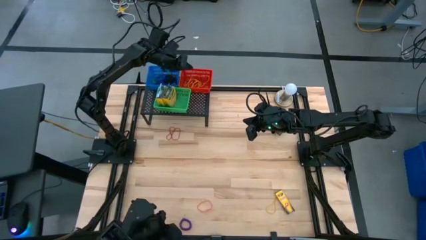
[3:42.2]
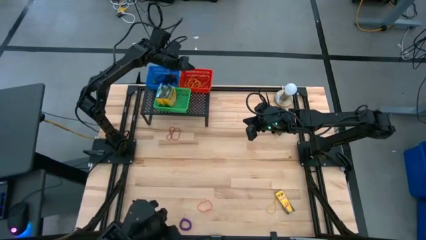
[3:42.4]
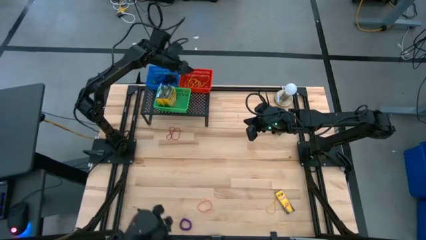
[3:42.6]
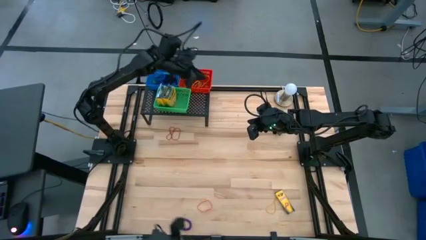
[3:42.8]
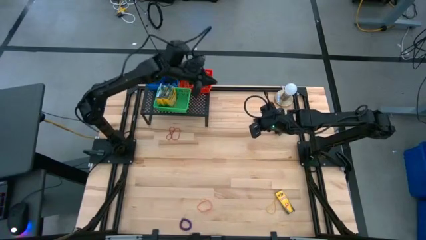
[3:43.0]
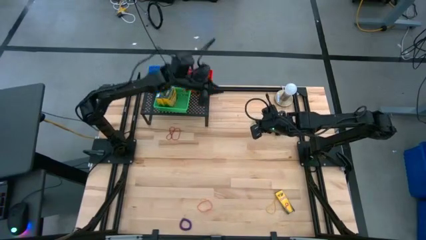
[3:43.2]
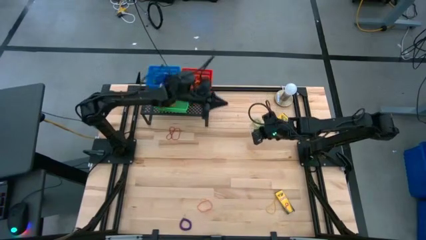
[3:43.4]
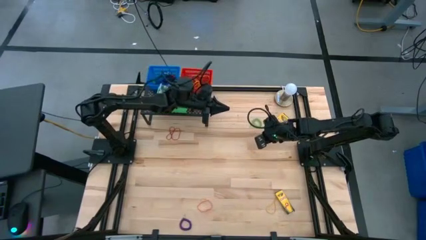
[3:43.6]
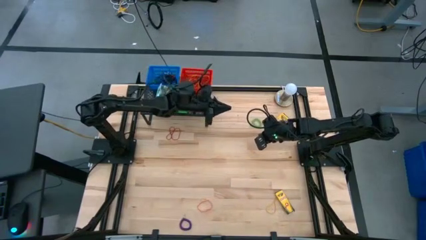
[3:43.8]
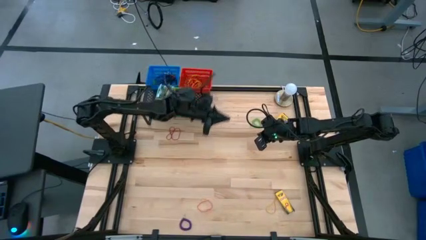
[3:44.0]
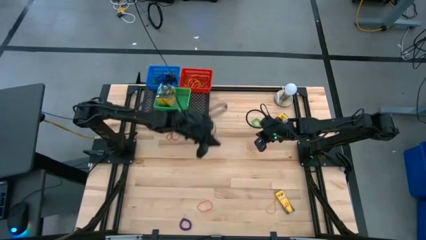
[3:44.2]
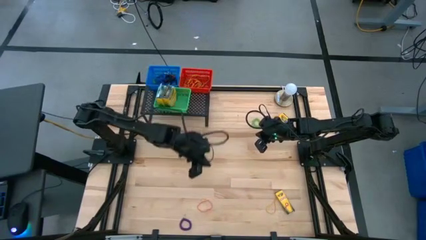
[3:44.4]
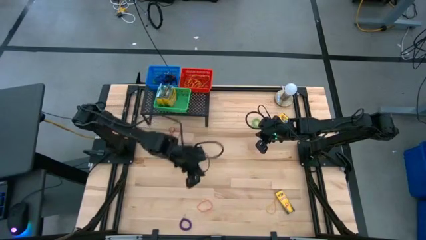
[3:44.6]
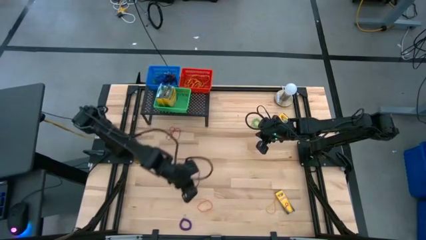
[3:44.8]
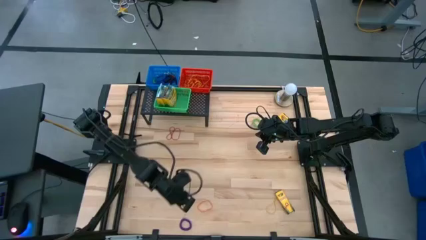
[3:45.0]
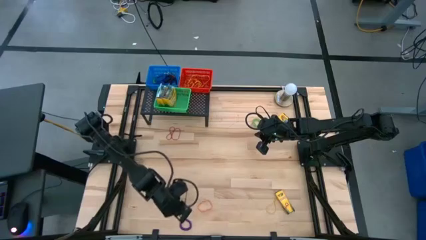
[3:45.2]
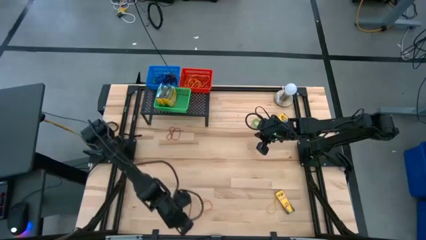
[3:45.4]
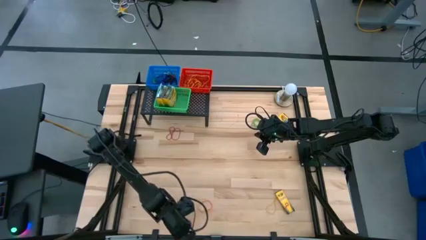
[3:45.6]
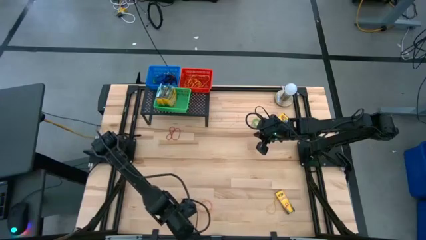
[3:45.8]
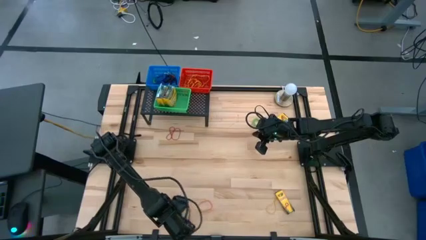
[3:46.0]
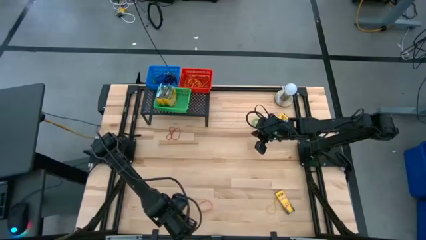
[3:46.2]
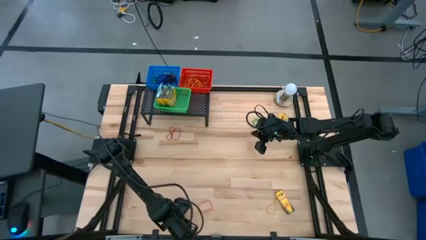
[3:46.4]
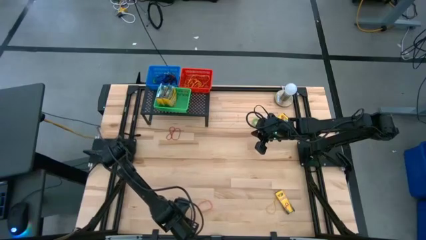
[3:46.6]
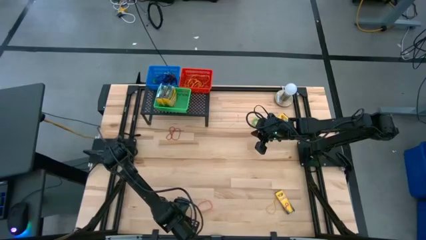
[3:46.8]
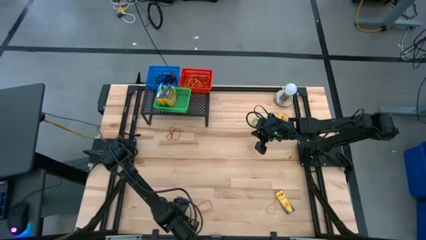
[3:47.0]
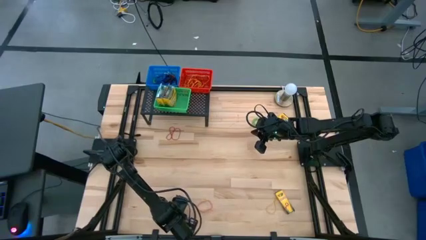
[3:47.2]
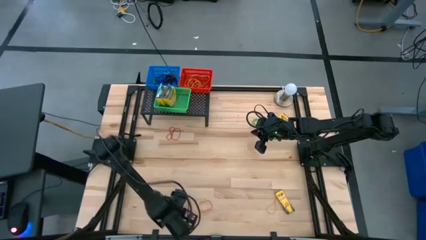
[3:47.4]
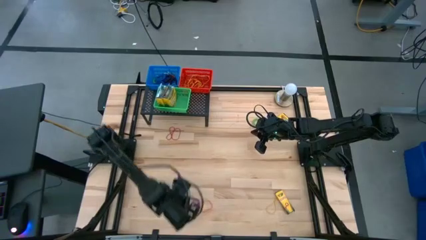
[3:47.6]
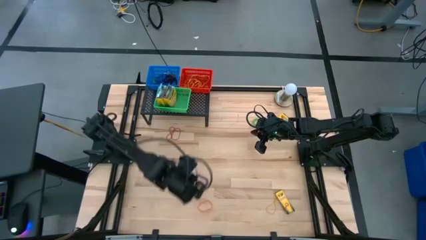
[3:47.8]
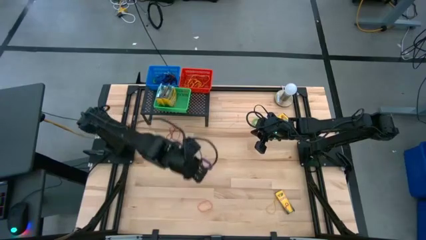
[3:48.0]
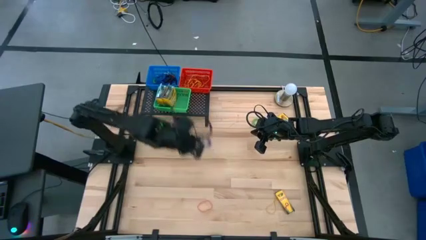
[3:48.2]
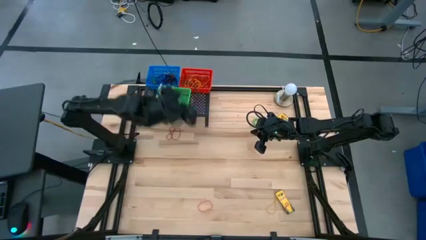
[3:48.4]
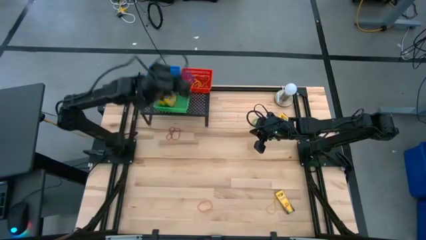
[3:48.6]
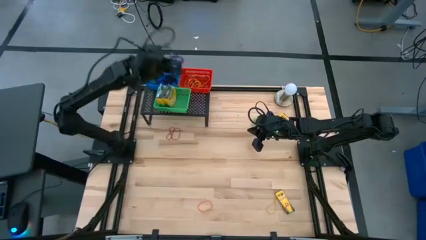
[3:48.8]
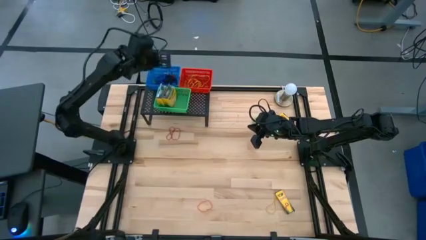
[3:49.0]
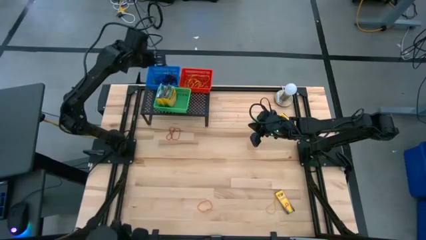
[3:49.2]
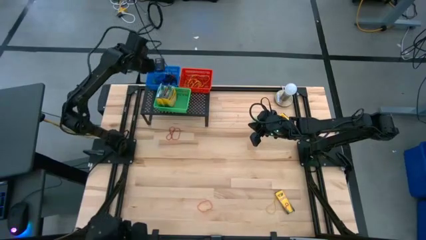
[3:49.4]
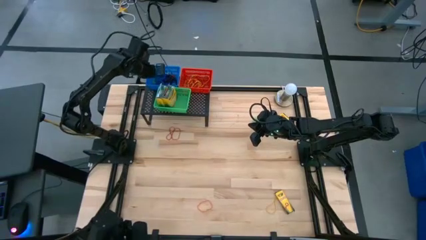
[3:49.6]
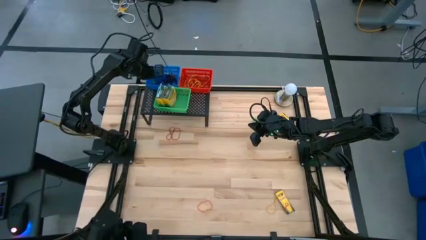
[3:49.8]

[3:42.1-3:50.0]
Task: Pick & Place Office Desk Supplies
Put the violet spring keychain into the blue bin

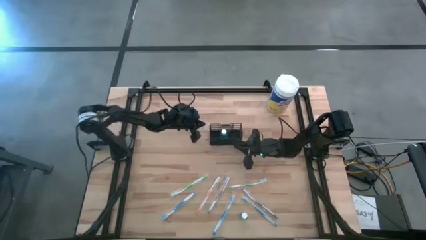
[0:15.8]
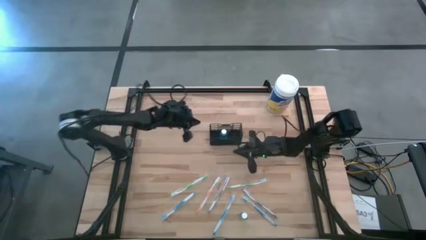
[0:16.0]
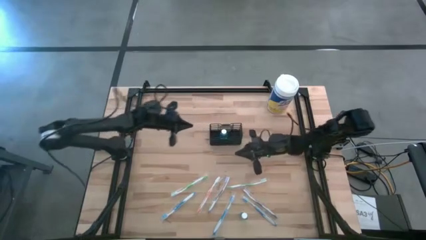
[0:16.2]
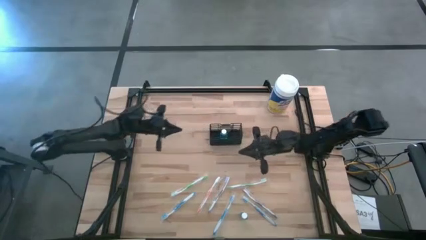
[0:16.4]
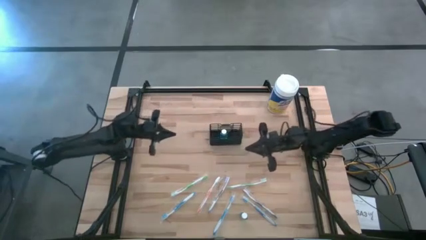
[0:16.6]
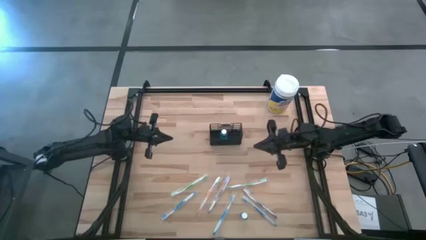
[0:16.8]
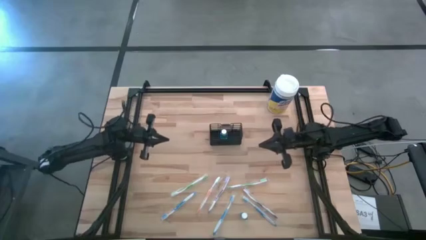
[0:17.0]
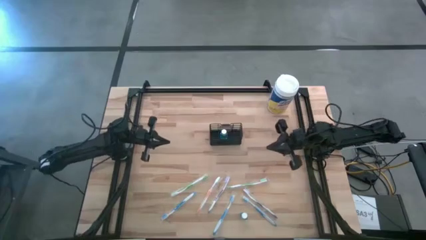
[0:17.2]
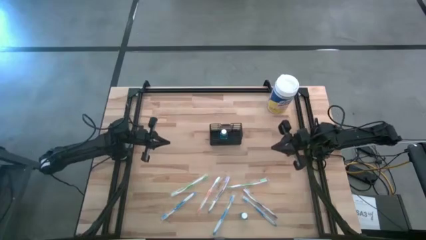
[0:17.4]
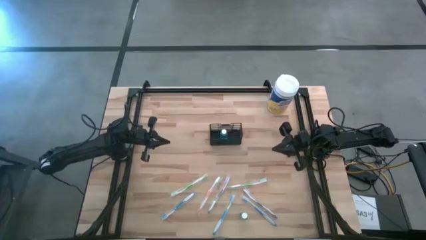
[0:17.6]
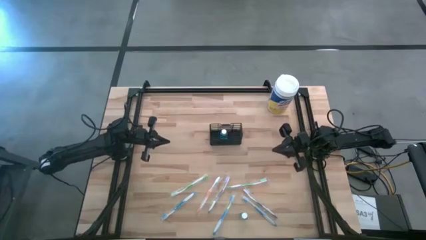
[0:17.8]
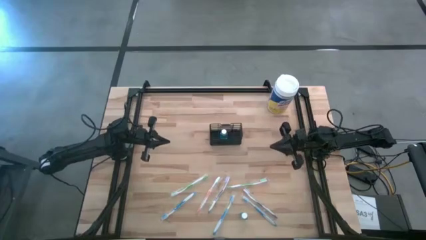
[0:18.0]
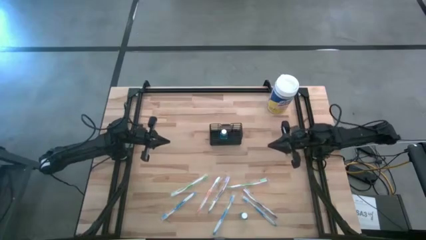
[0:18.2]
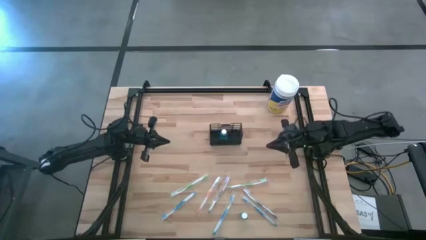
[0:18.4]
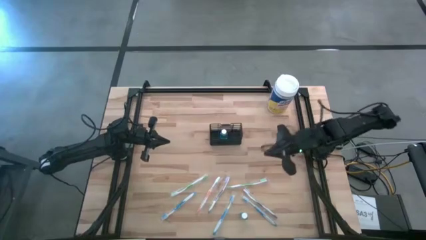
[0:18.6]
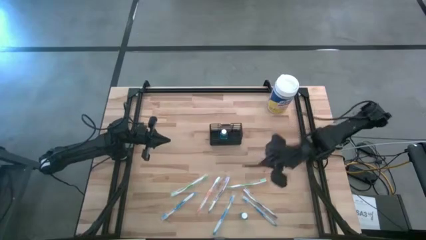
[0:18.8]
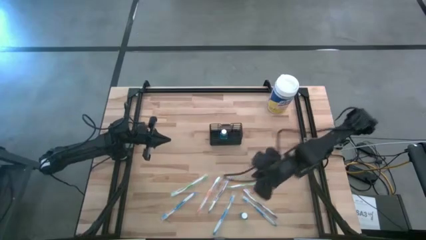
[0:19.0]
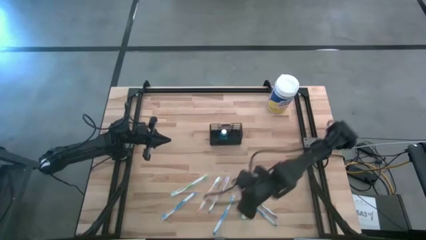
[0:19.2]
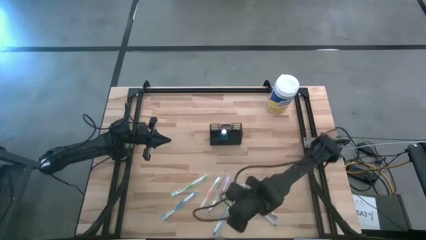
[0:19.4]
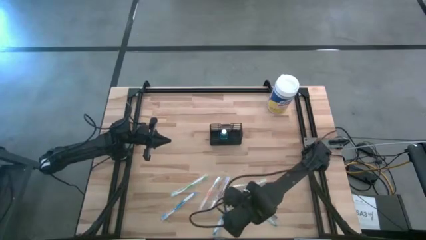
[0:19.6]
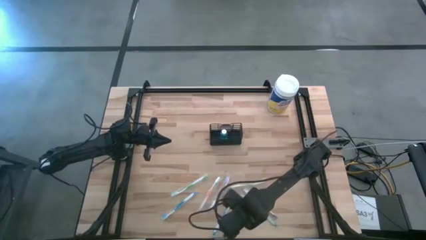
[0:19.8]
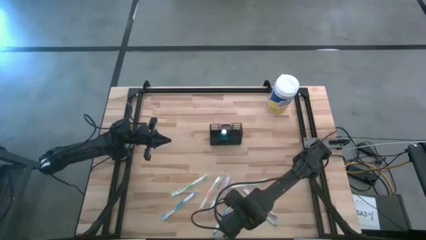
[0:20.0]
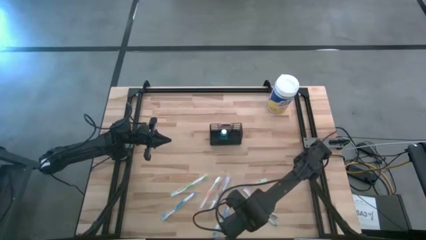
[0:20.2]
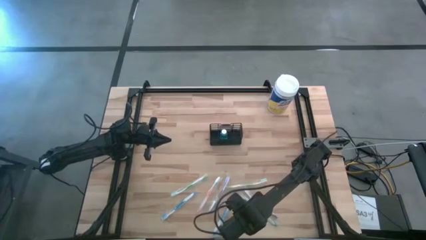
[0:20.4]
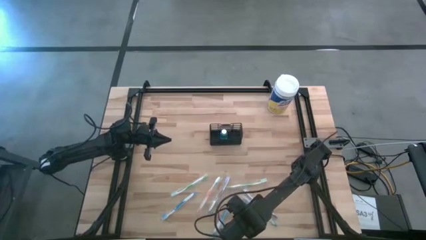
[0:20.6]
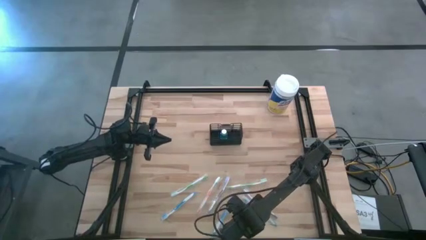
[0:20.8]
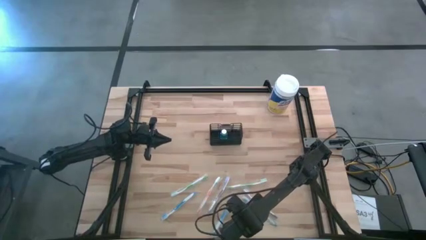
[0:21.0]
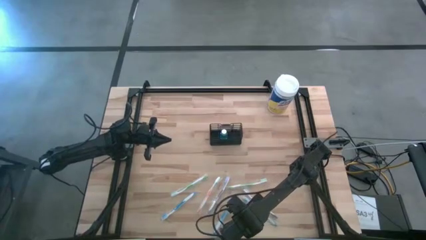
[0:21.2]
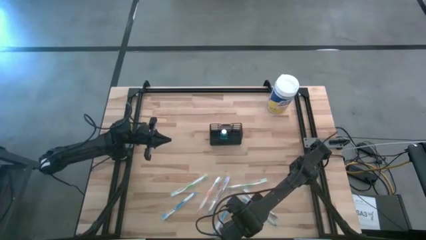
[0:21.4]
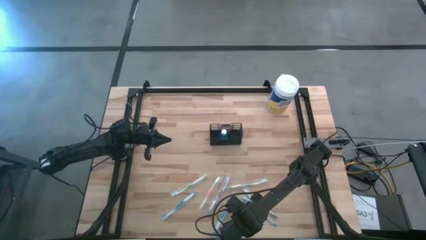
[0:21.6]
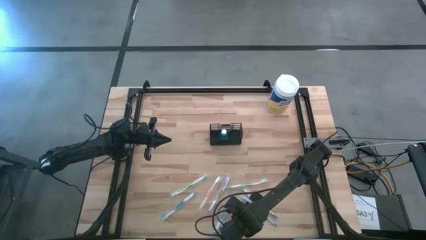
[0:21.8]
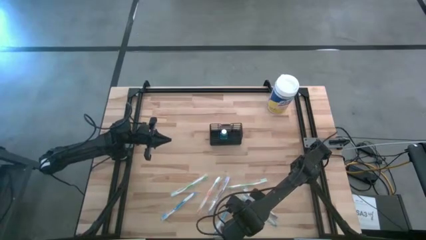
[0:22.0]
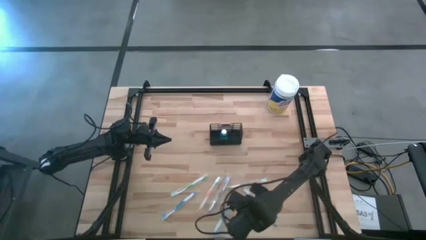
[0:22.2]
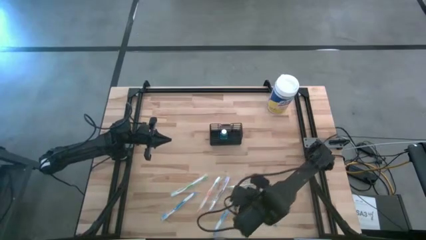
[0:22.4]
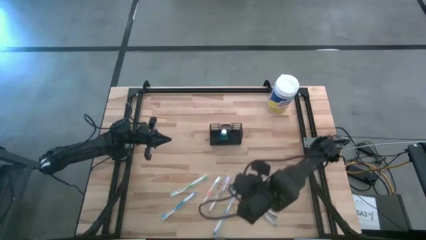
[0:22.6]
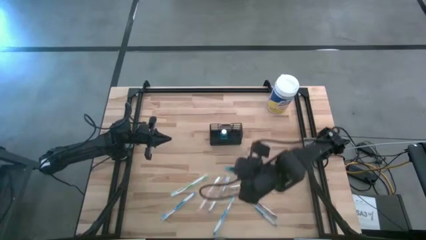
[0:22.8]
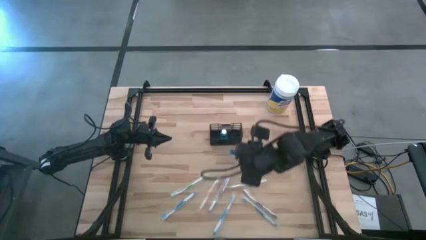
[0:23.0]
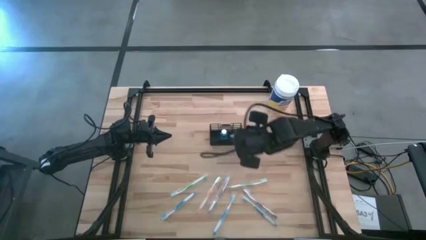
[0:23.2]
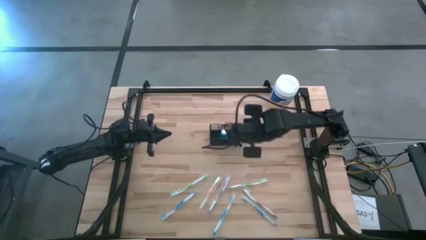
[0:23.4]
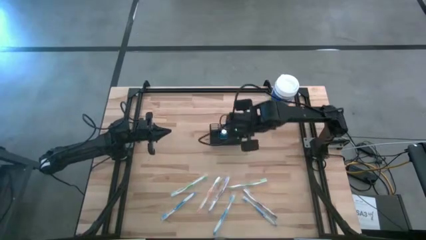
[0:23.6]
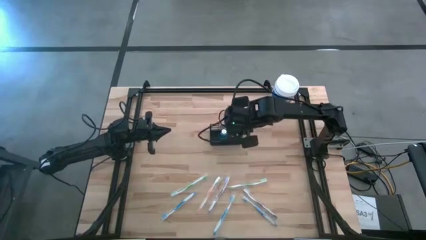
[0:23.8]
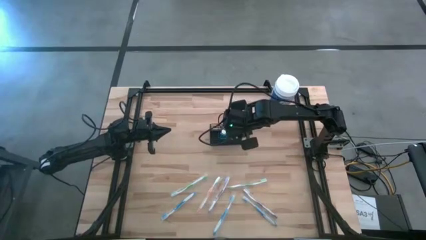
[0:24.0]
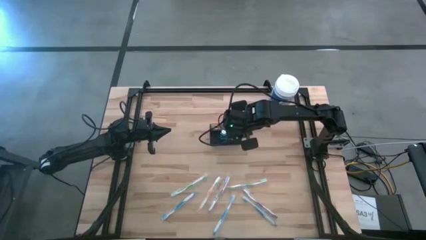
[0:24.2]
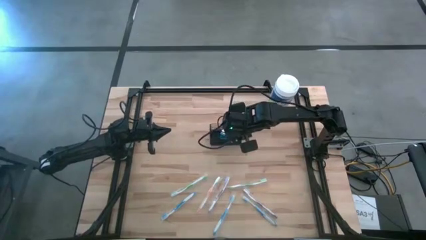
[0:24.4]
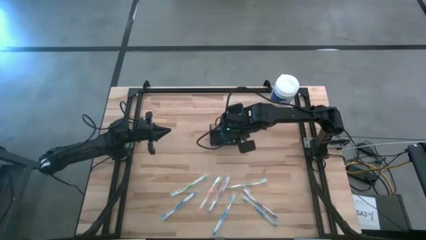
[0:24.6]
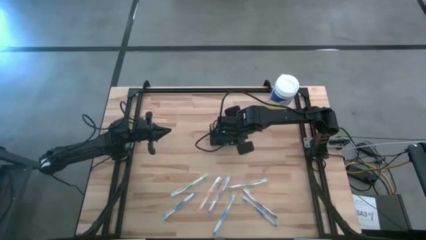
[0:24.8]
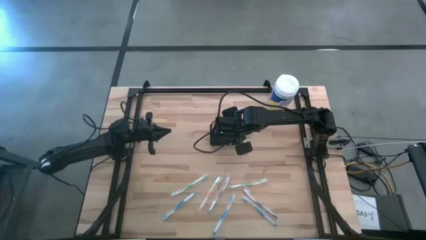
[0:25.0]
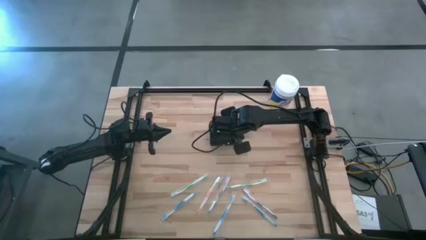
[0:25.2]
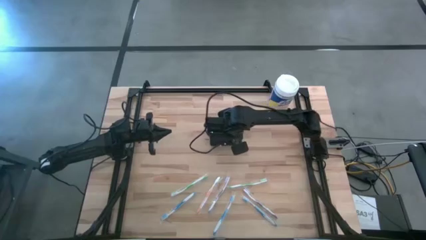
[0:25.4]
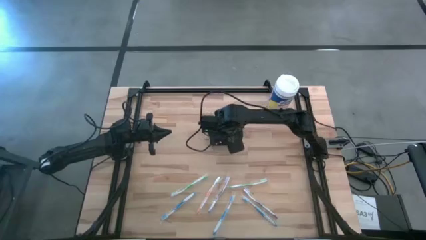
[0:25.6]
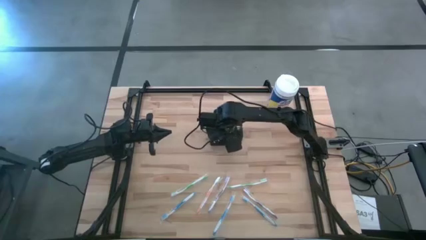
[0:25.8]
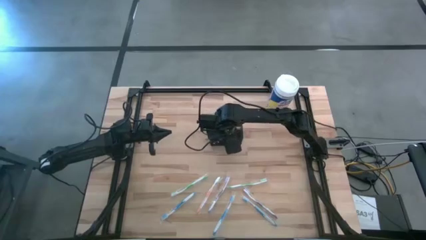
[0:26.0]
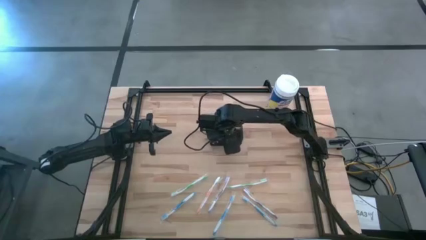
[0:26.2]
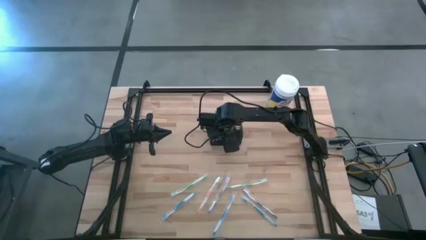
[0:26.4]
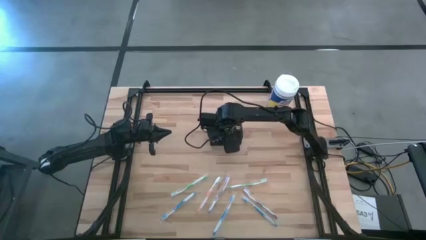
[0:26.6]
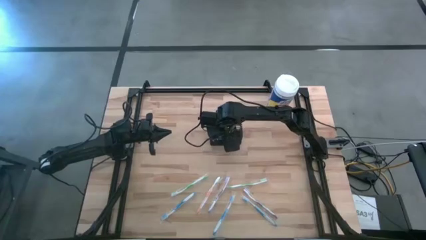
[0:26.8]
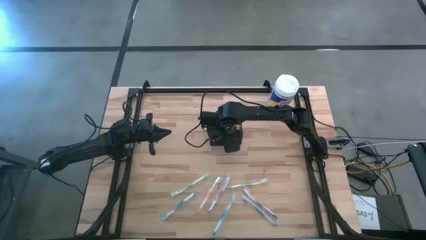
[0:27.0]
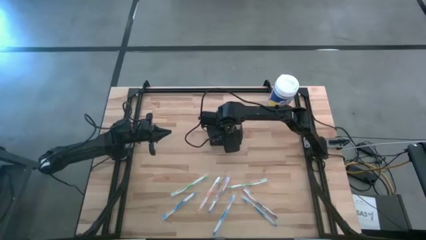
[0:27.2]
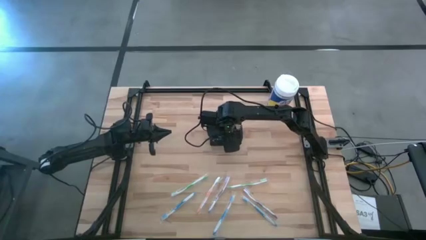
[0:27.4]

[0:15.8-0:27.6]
Task: Pick & Place toothbrushing station
Put the blue mouthwash bottle into the black wire organizer
